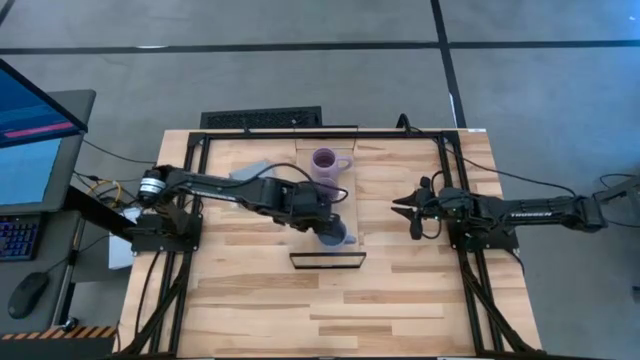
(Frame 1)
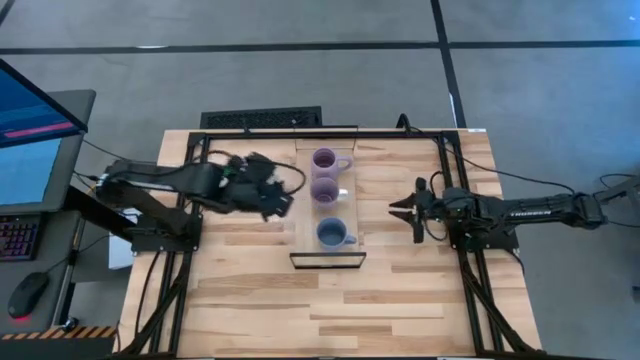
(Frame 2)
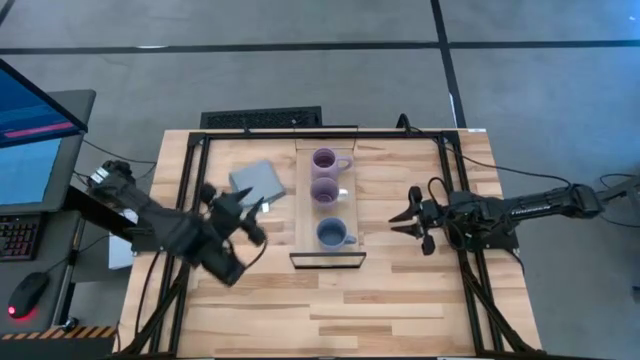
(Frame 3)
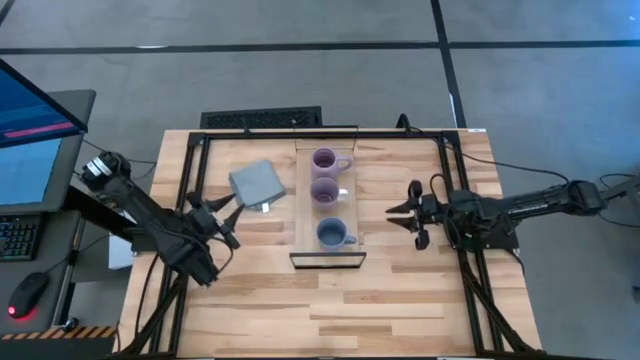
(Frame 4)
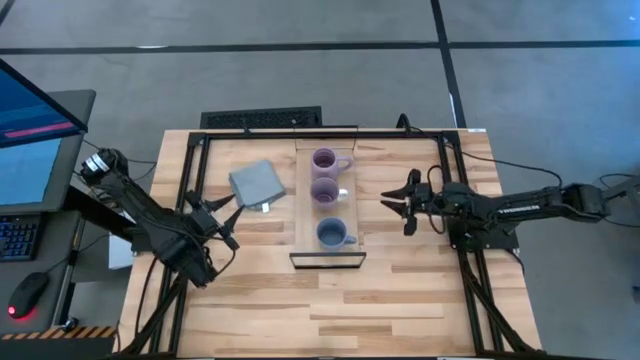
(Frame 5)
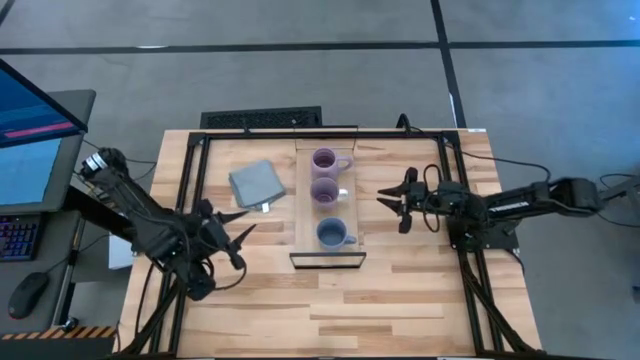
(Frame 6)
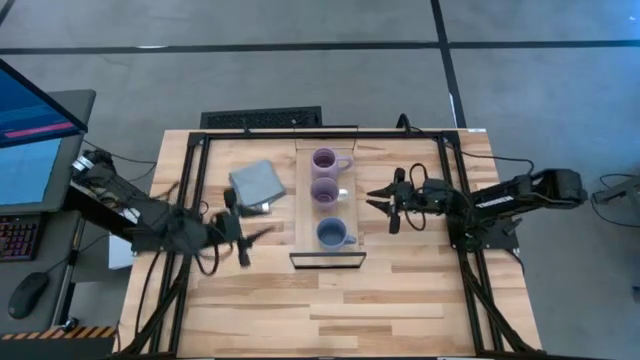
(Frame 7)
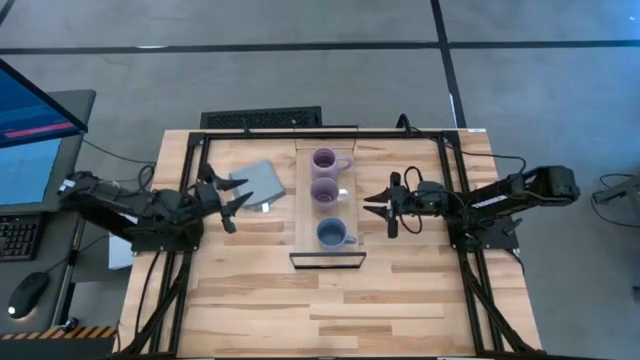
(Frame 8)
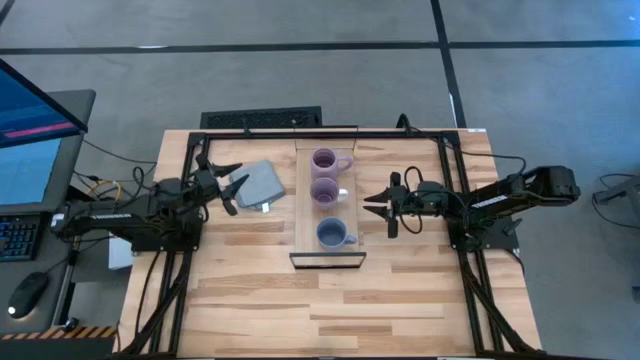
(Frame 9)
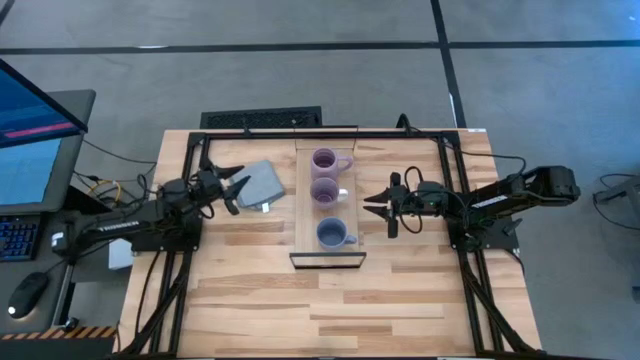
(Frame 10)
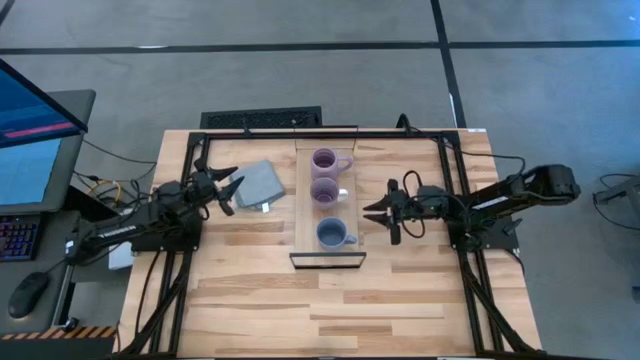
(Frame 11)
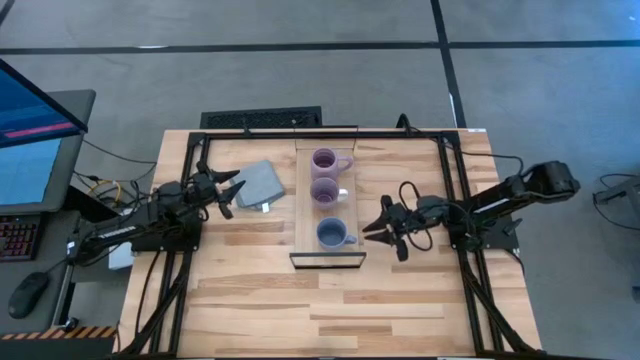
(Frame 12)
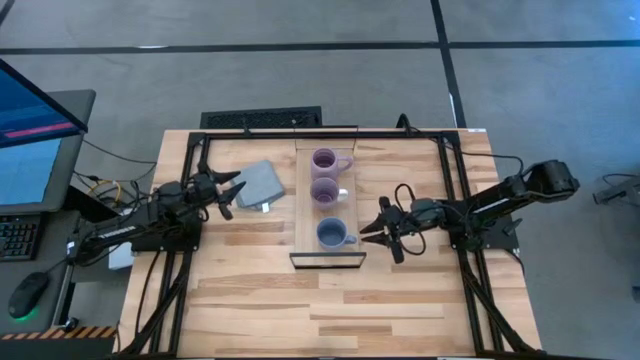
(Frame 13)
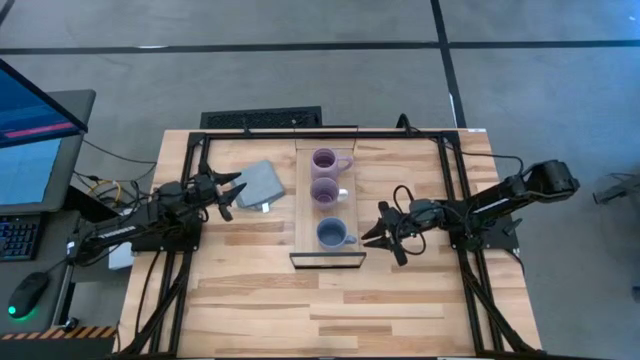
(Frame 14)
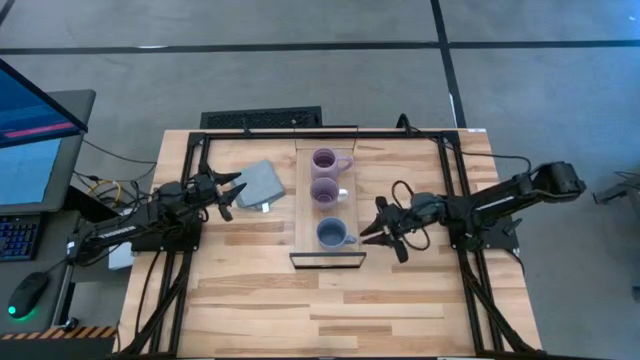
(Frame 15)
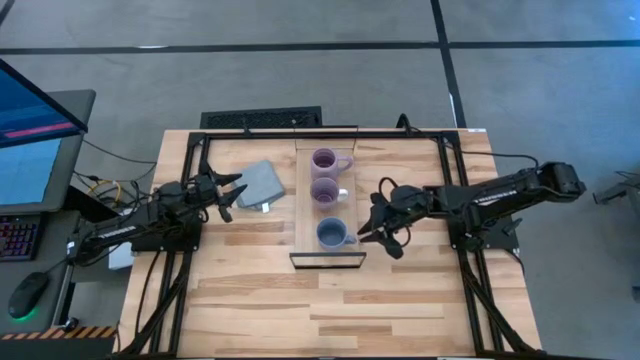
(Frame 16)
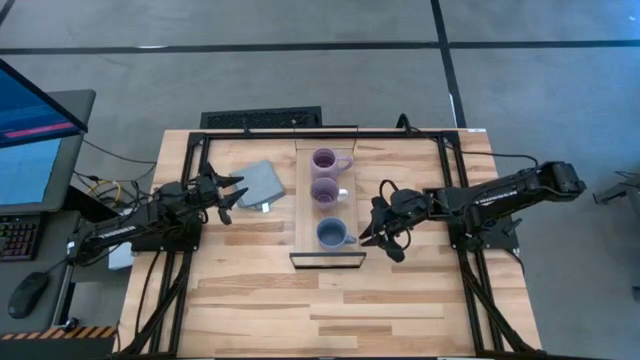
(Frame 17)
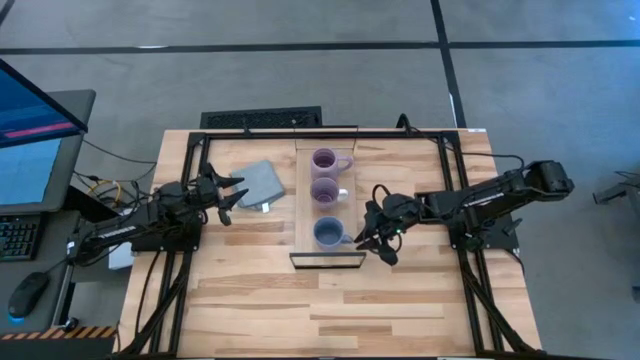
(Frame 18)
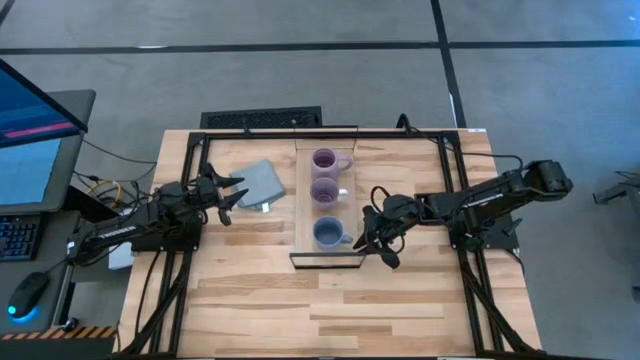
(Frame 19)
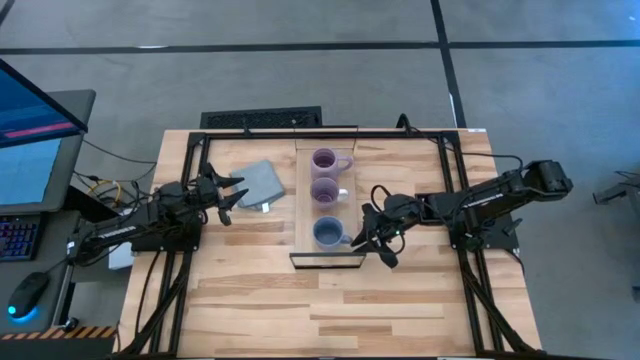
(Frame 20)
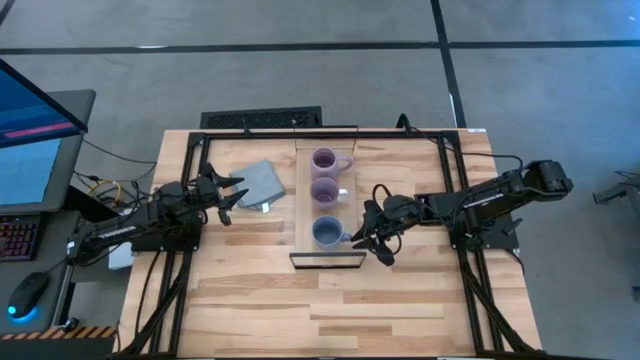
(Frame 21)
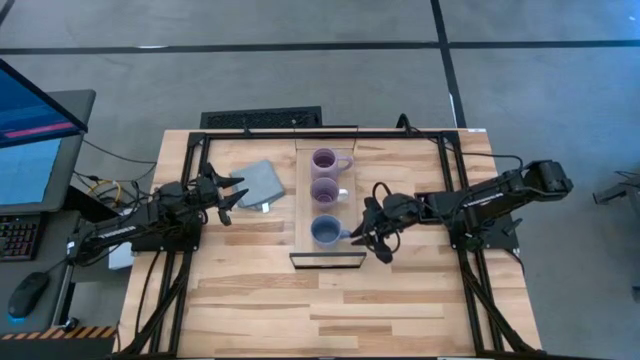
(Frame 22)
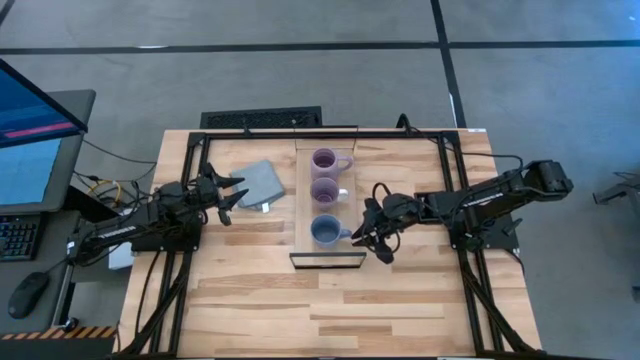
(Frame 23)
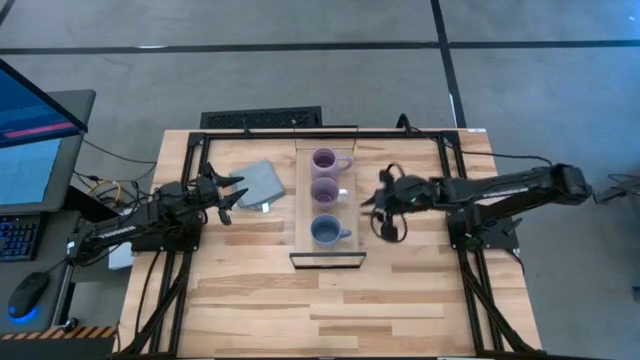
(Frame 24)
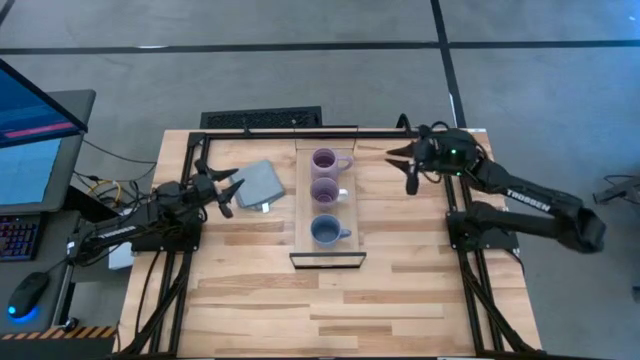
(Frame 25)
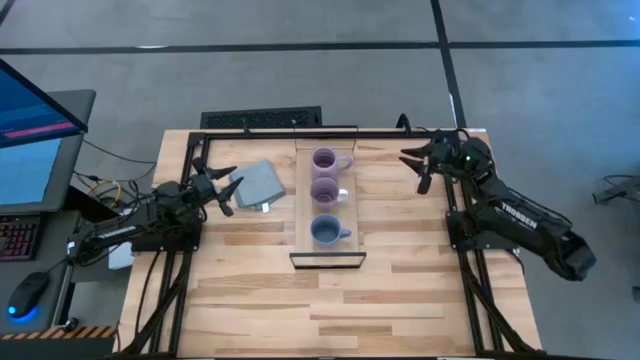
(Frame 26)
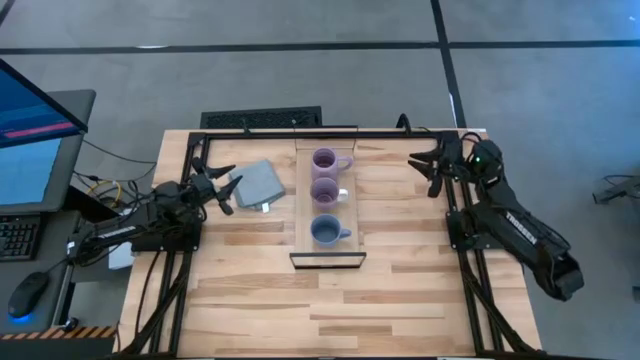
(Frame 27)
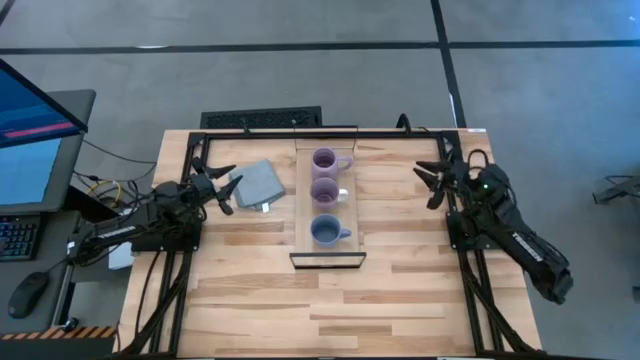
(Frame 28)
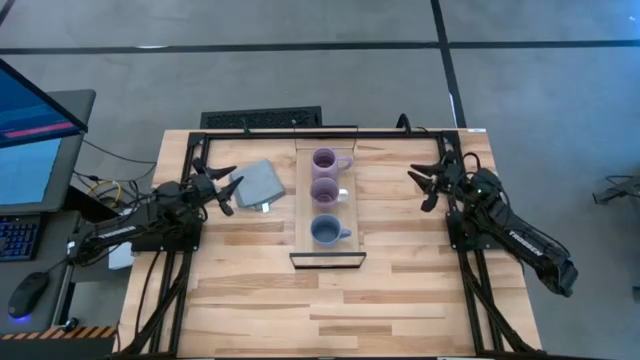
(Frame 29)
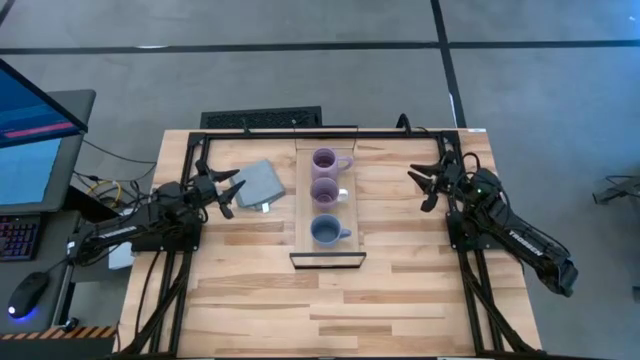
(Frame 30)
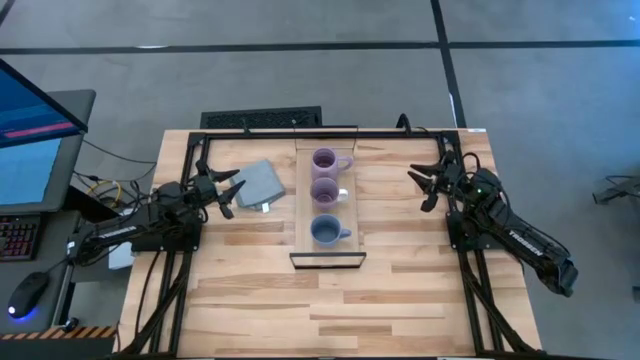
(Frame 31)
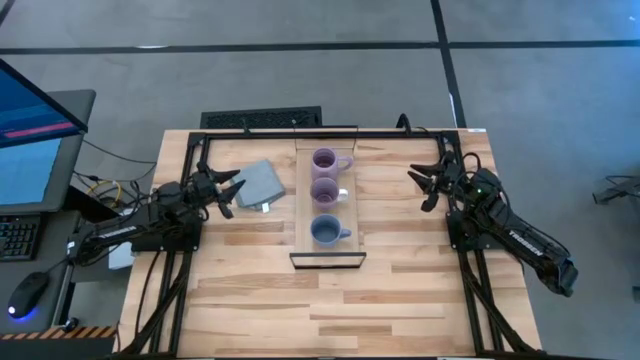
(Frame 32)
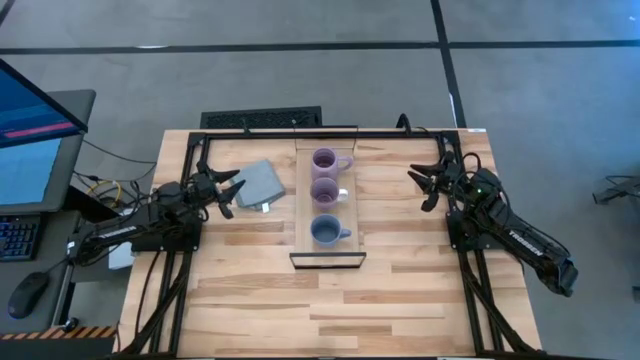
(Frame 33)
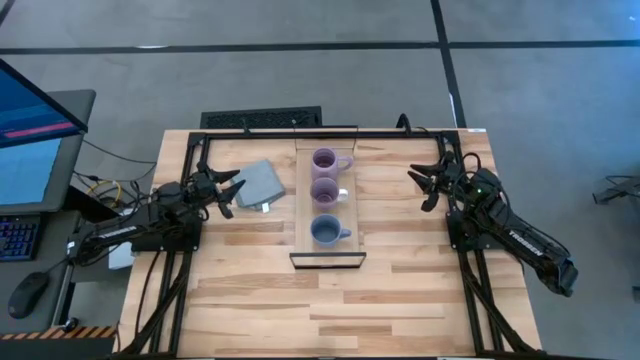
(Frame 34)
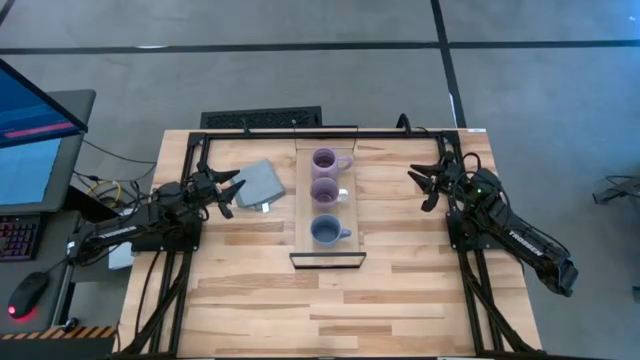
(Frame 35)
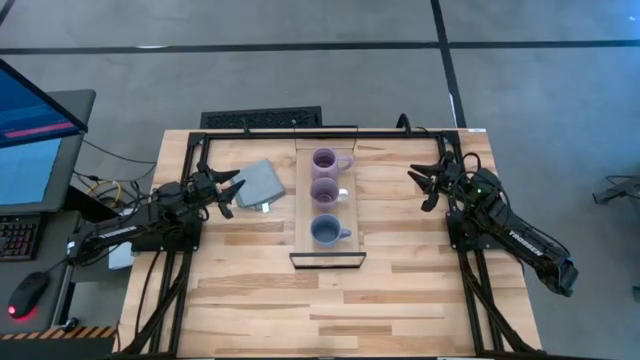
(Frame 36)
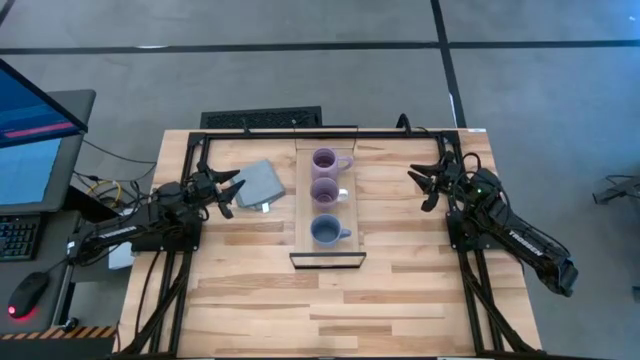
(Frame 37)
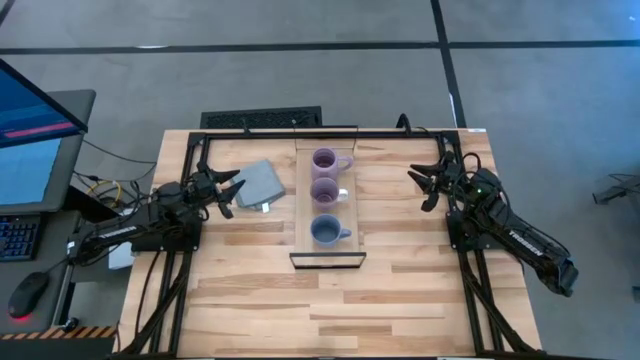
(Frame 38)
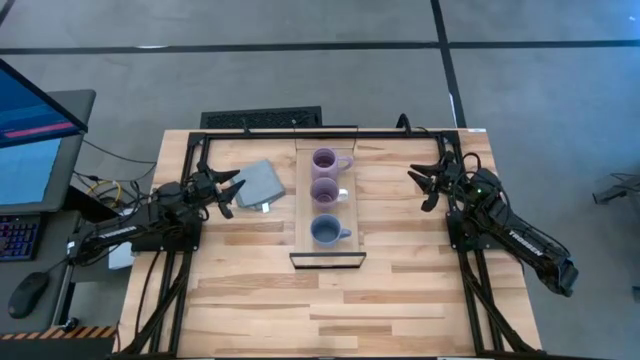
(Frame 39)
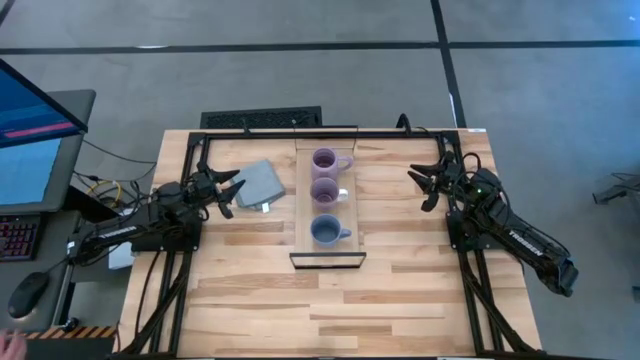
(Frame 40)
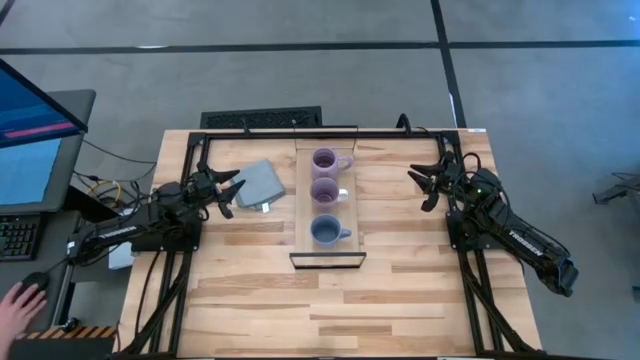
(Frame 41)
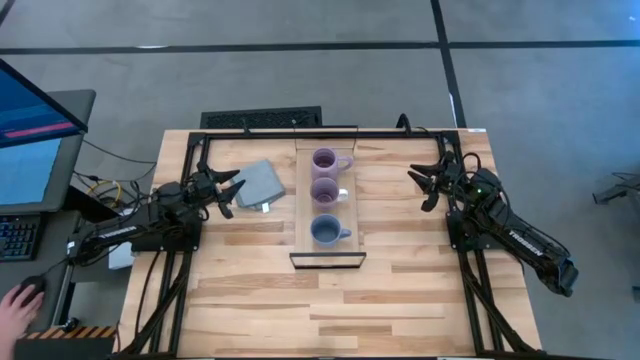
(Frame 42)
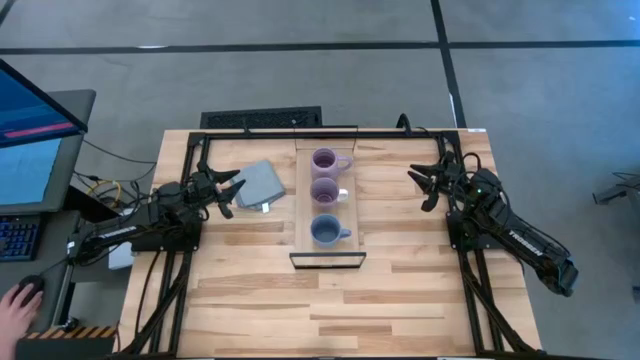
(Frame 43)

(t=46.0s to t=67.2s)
Task: Stack small to large cups/mugs on shelf
Return to Home Position

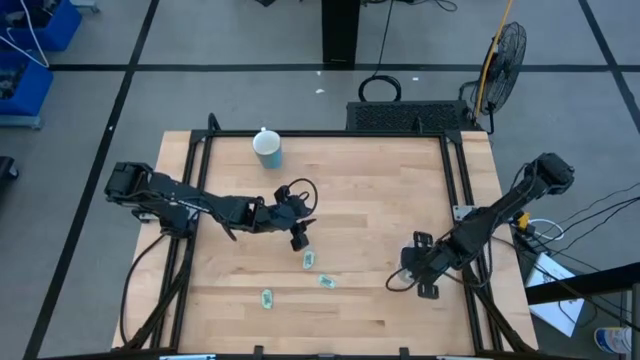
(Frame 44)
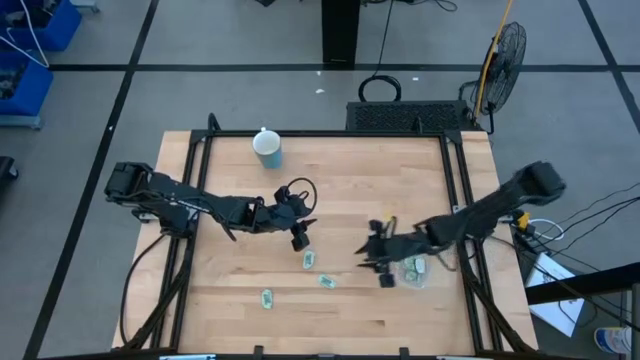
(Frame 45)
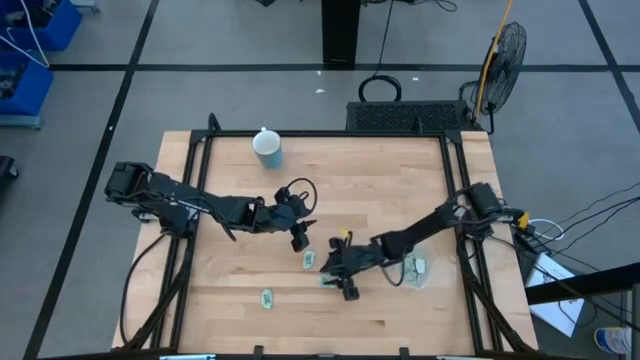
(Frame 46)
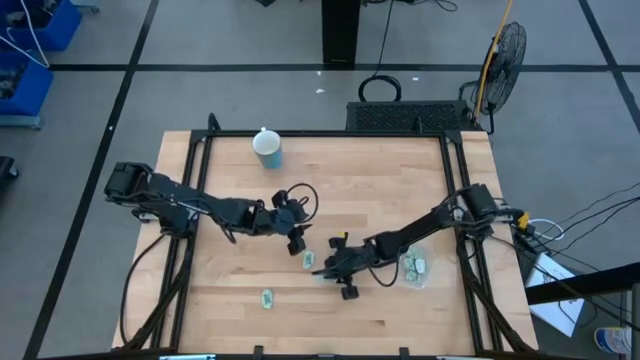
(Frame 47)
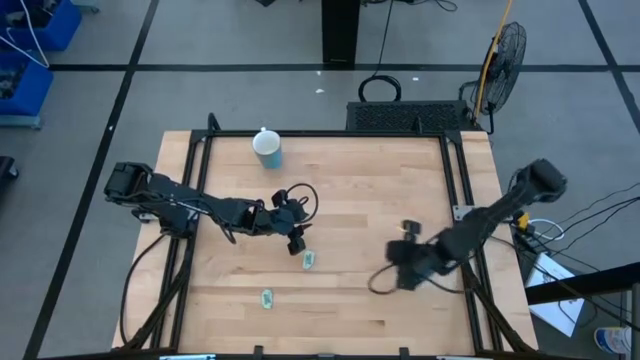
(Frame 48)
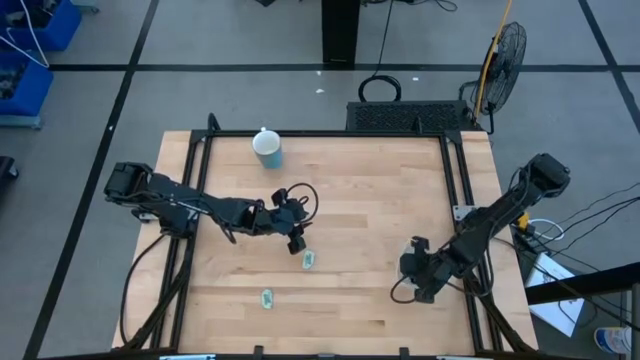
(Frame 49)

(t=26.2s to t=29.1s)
Task: Pick and place Stevia / Truvia into bins
Put the stevia packet into the transparent container
